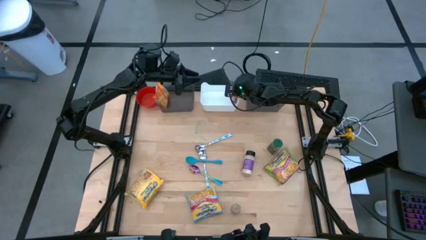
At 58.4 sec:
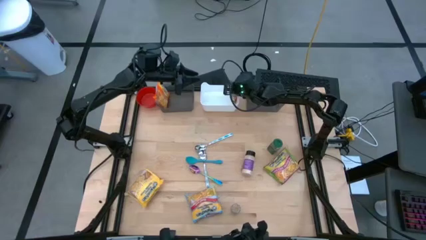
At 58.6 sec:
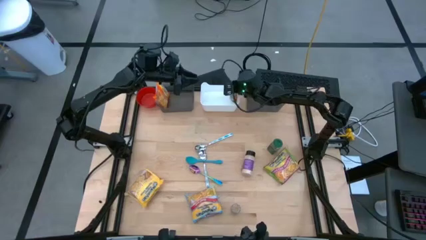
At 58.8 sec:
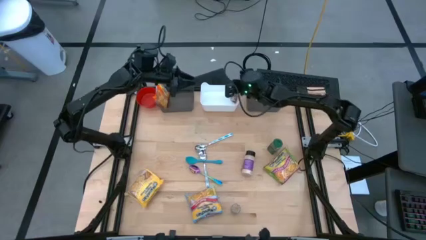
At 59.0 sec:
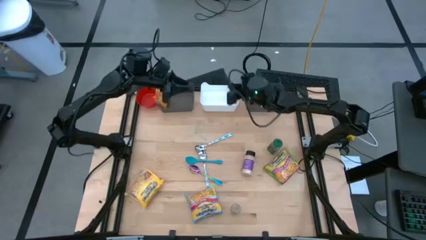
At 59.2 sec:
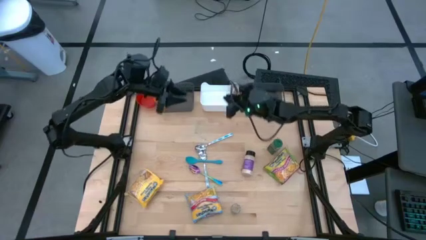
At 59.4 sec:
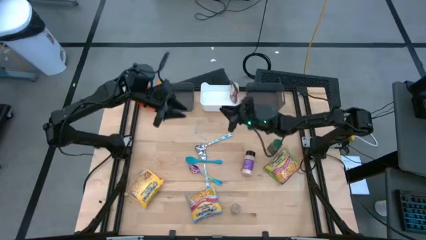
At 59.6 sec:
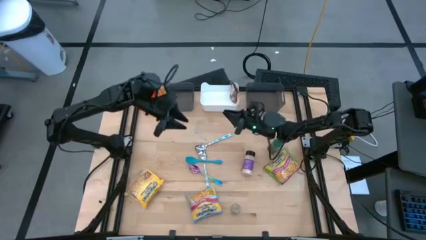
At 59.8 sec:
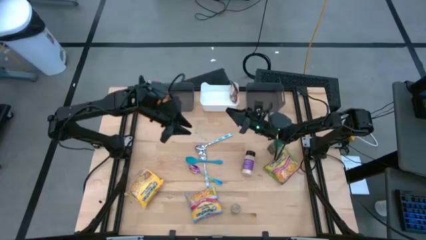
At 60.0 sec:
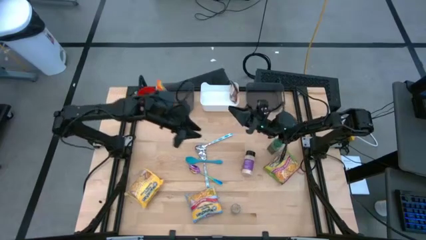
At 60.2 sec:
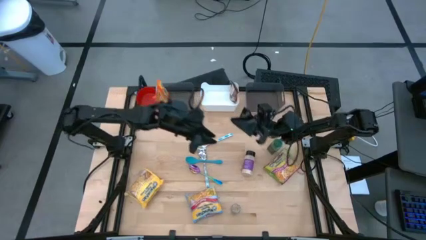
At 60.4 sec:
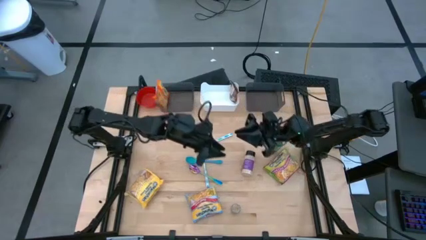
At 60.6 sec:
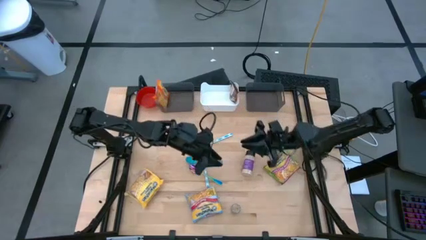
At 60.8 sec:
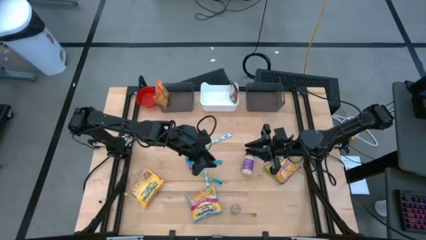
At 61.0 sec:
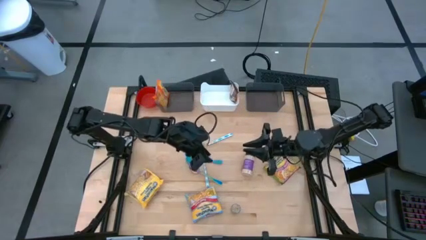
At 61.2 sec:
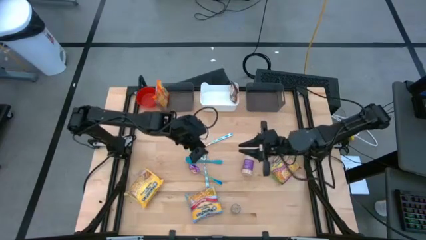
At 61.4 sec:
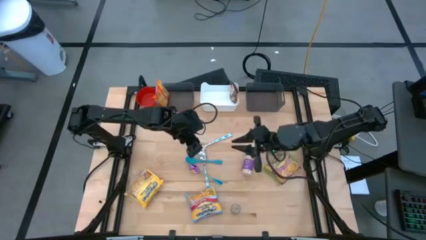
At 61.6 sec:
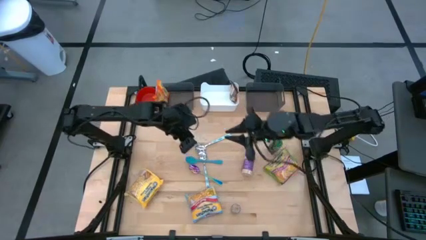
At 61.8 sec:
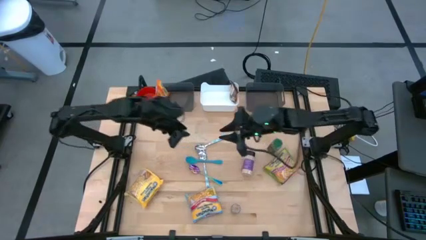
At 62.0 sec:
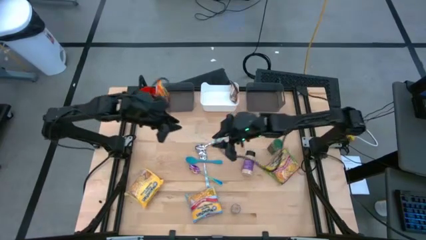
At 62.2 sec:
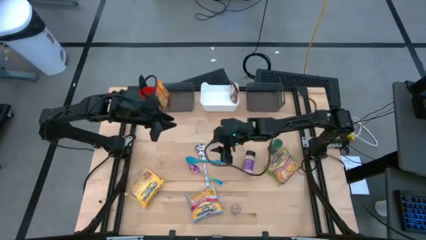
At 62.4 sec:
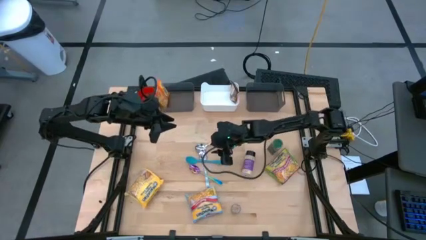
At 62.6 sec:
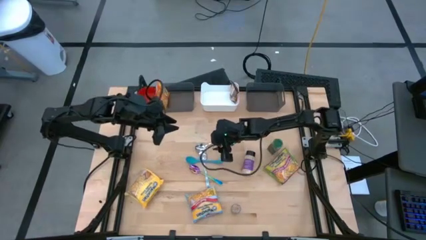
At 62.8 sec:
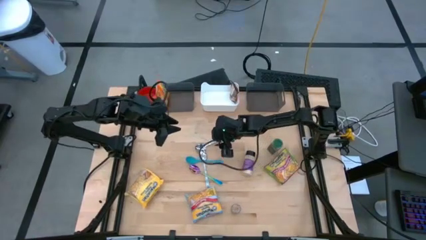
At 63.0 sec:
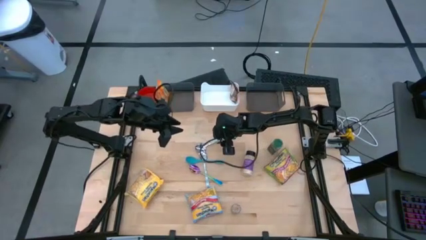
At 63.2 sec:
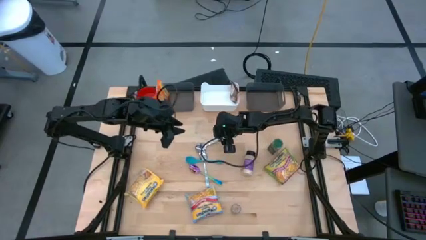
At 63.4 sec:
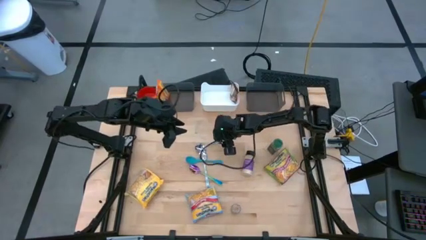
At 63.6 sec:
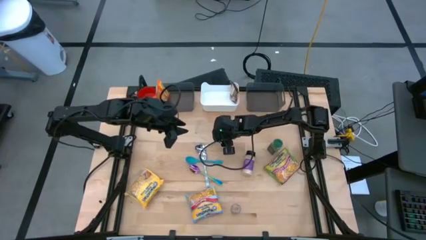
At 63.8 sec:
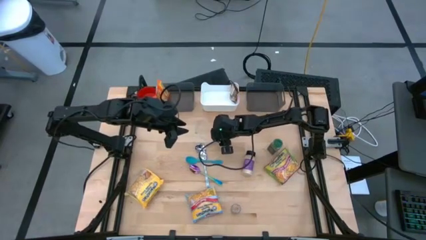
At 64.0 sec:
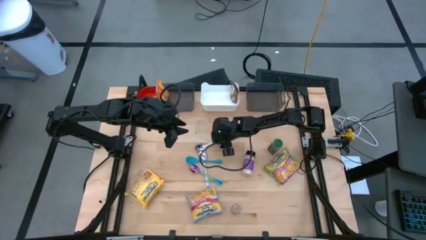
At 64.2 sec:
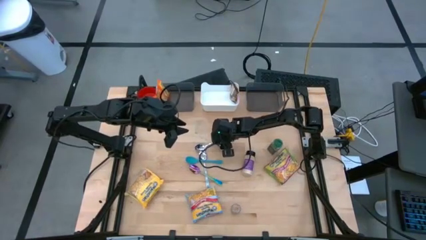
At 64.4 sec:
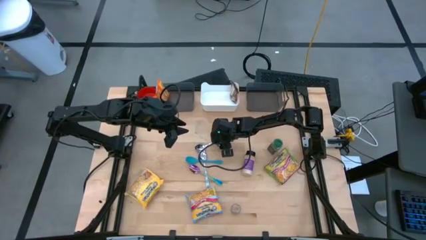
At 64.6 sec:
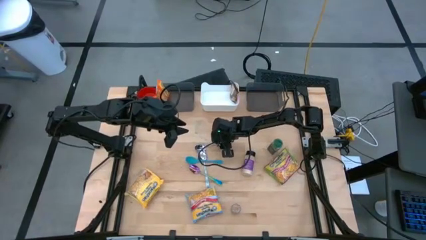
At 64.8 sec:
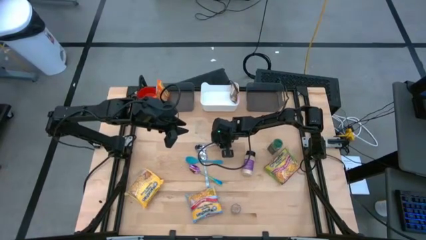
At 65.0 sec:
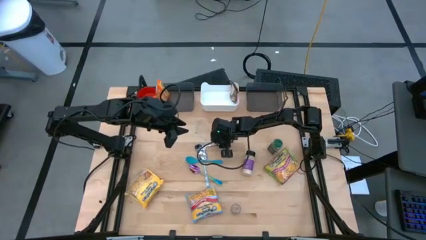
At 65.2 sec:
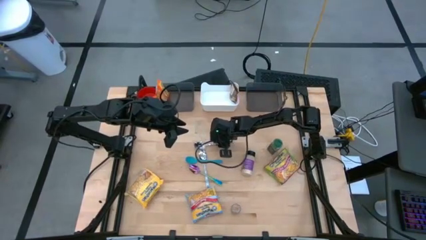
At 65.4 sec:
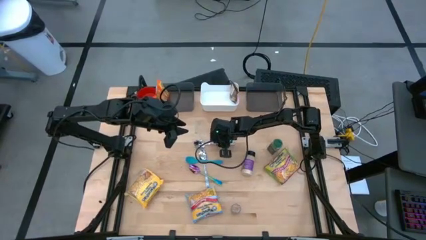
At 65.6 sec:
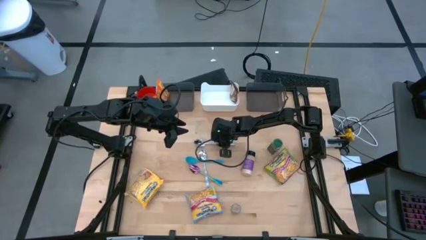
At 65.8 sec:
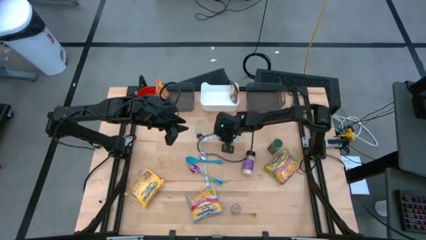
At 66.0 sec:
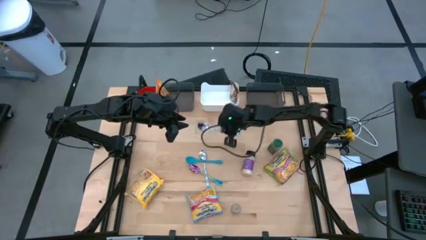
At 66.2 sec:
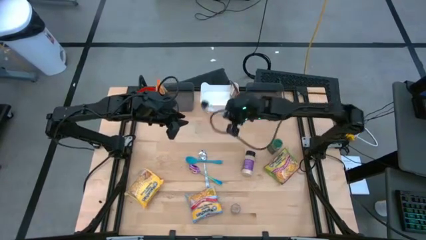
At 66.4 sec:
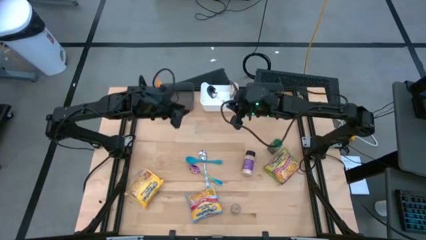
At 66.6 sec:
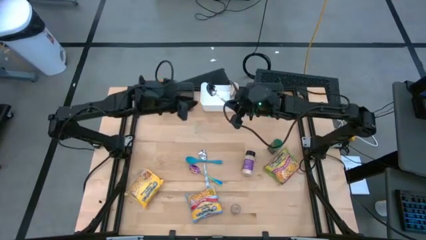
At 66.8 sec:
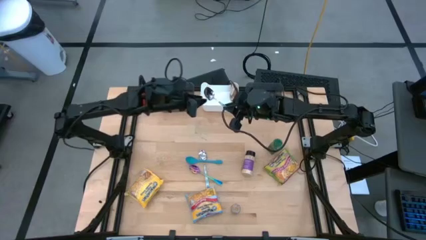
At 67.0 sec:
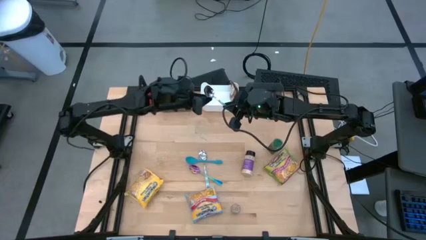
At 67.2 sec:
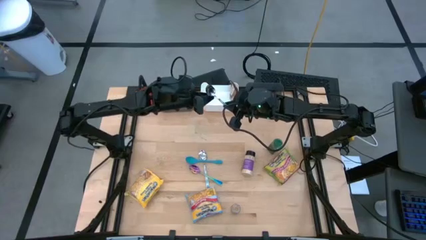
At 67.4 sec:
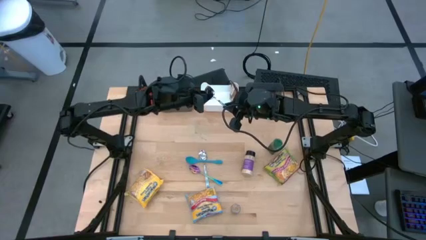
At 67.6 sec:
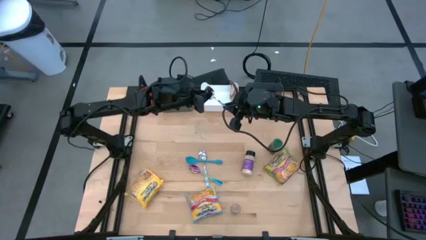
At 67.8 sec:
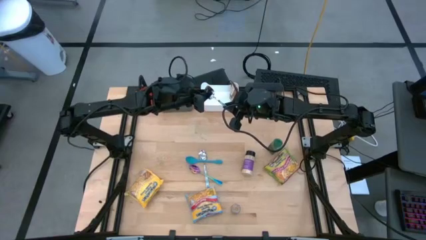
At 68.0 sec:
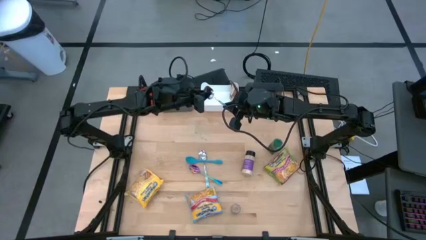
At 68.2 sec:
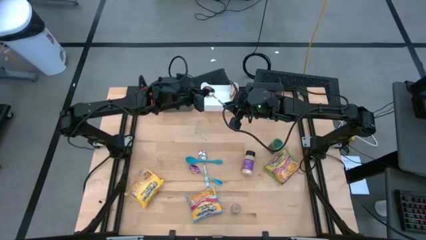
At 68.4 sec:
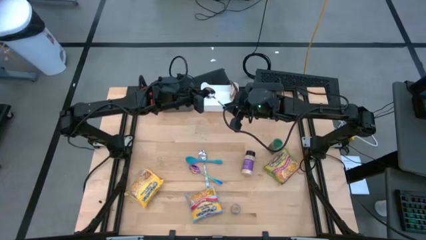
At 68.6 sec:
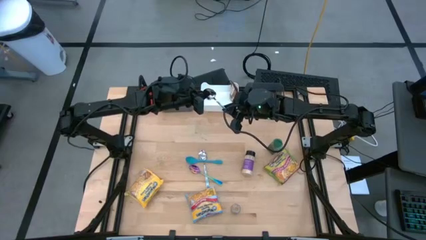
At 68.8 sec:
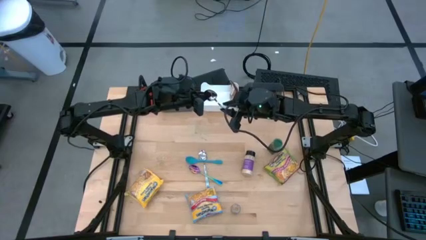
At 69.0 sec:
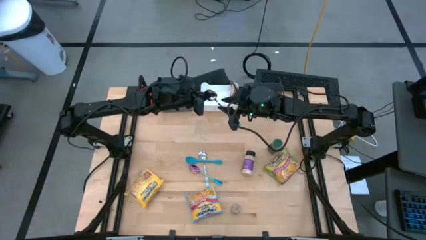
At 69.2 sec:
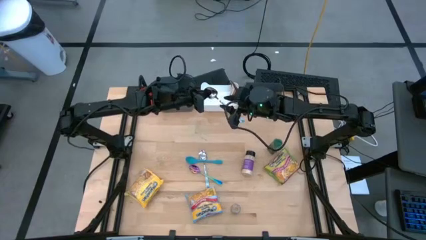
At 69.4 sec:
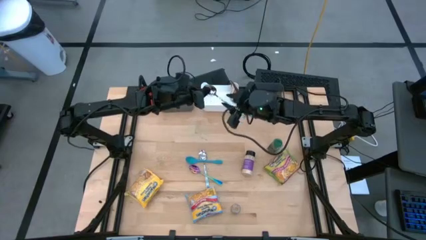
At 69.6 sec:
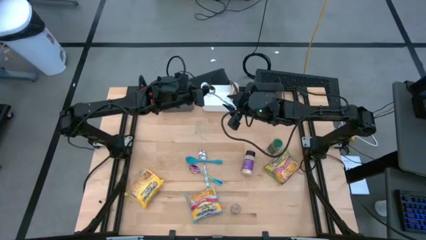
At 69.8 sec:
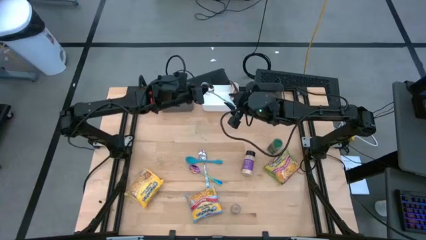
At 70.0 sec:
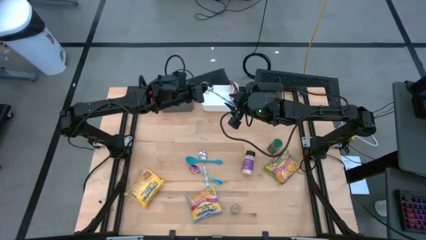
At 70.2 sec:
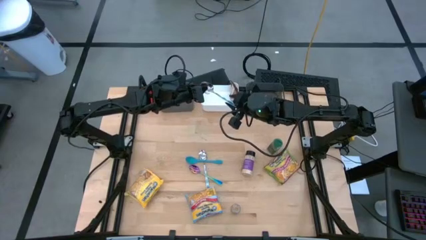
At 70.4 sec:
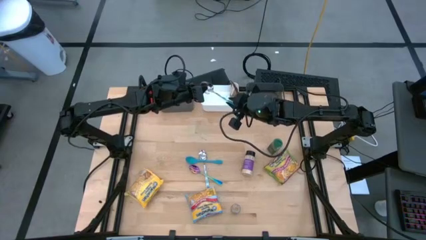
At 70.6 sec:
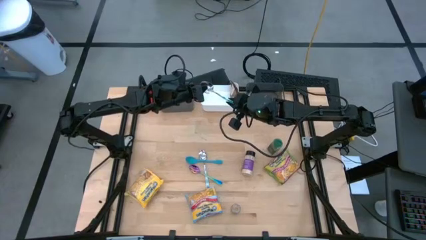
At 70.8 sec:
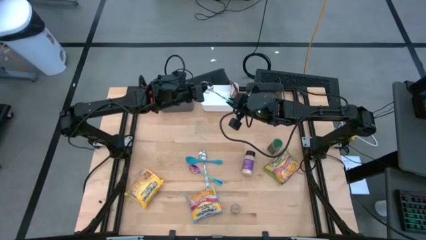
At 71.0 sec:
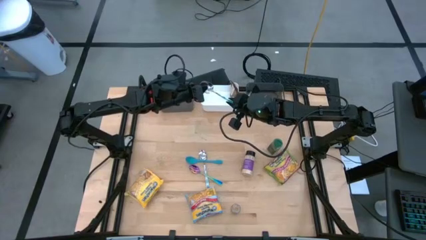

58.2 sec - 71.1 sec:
Task: Pick & Place Food Item
Put the top light blue spoon into the right black bin
